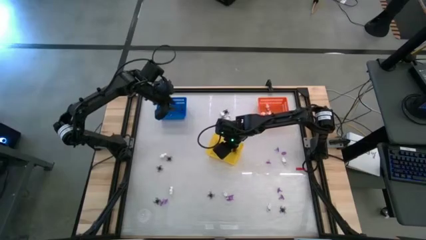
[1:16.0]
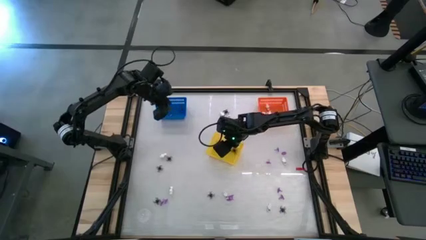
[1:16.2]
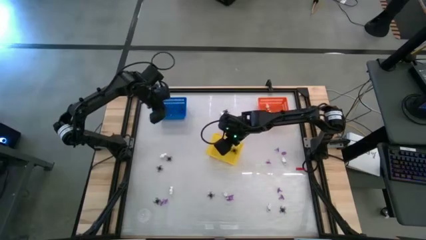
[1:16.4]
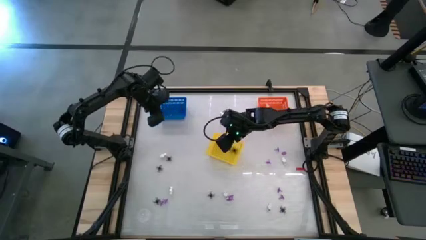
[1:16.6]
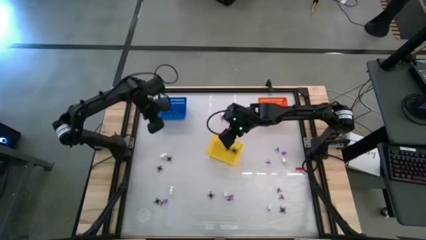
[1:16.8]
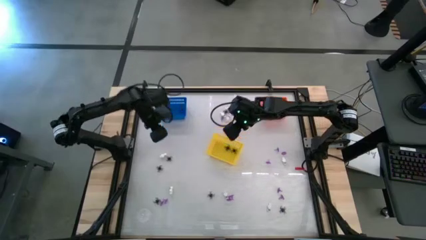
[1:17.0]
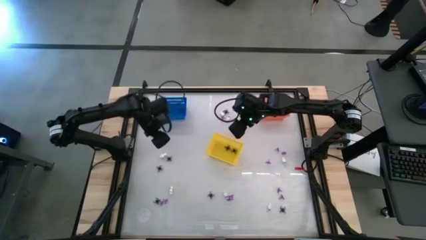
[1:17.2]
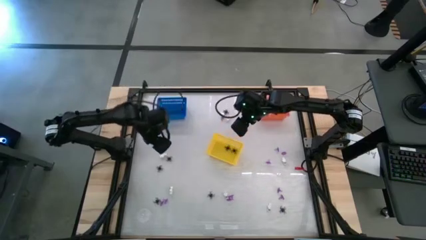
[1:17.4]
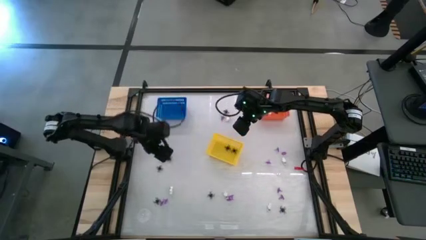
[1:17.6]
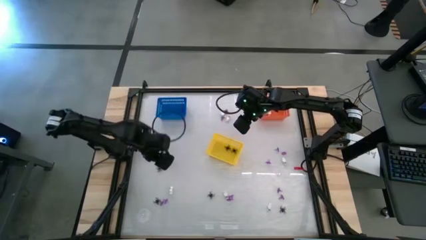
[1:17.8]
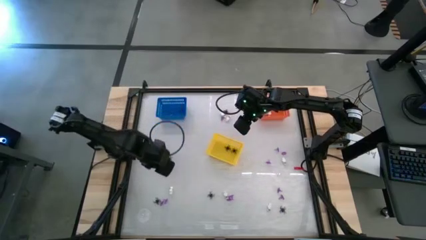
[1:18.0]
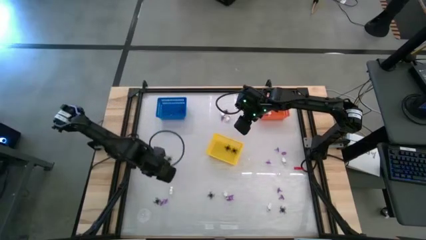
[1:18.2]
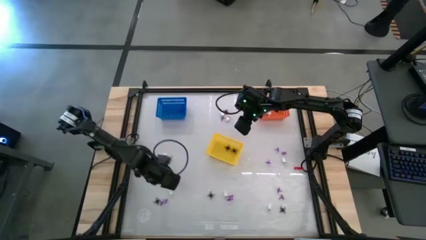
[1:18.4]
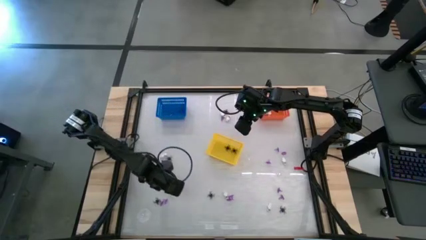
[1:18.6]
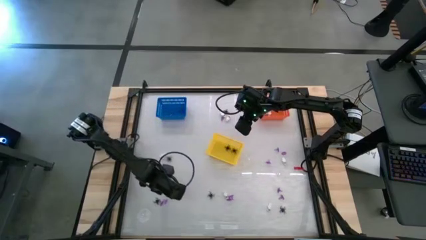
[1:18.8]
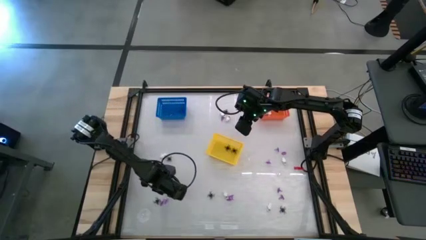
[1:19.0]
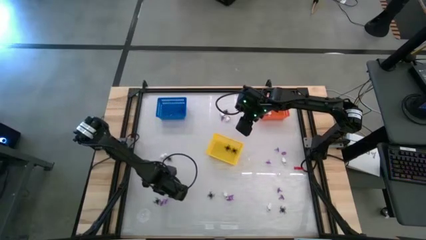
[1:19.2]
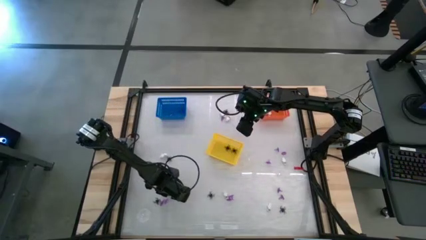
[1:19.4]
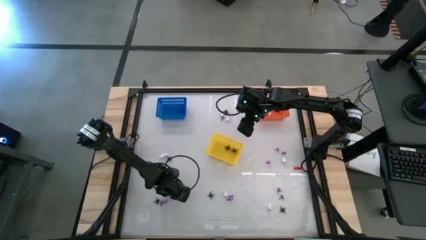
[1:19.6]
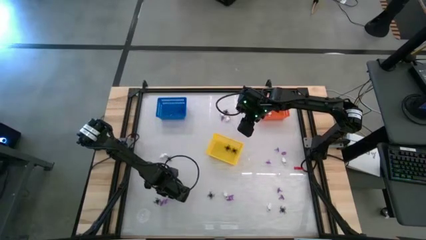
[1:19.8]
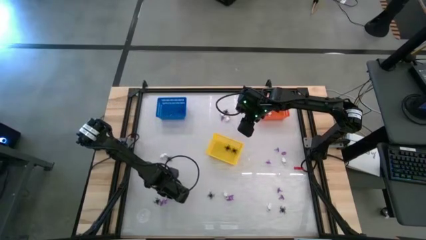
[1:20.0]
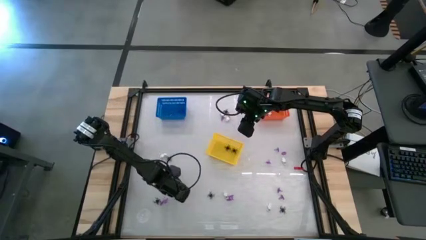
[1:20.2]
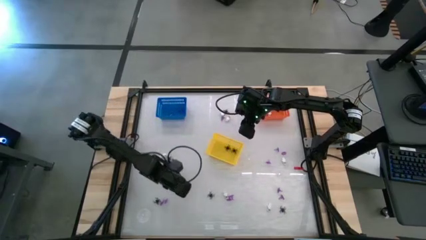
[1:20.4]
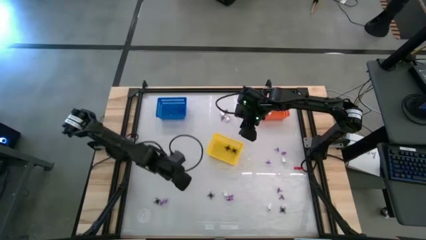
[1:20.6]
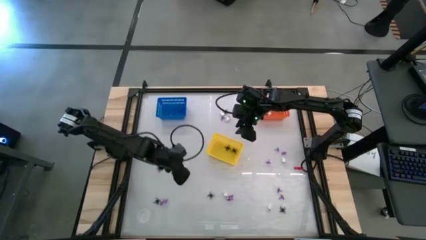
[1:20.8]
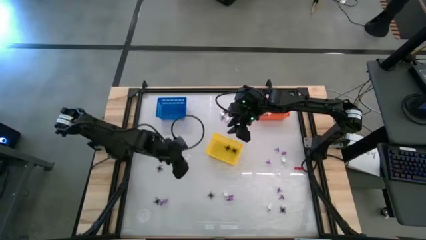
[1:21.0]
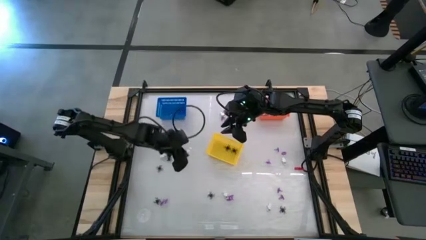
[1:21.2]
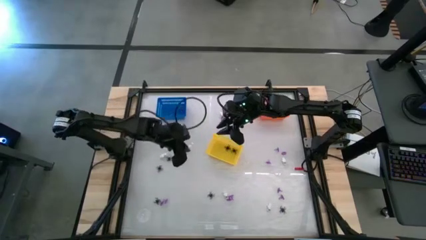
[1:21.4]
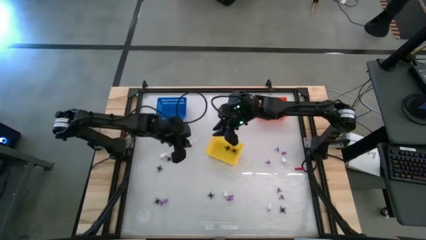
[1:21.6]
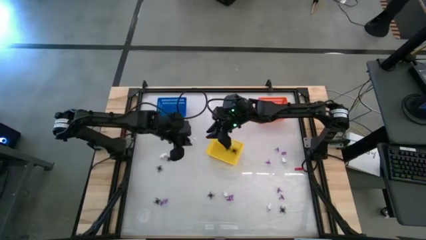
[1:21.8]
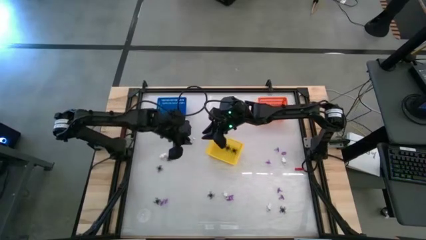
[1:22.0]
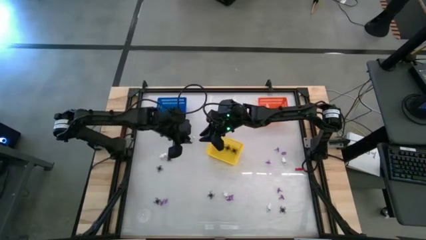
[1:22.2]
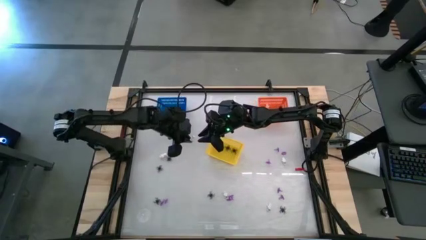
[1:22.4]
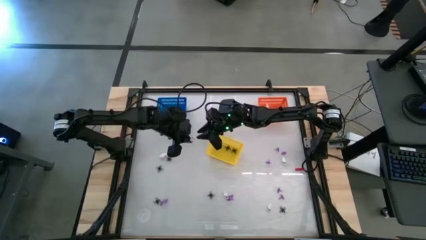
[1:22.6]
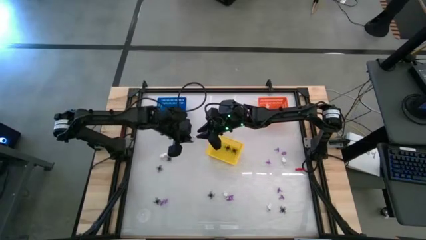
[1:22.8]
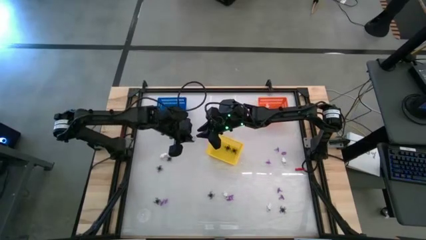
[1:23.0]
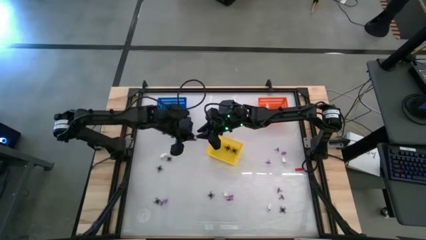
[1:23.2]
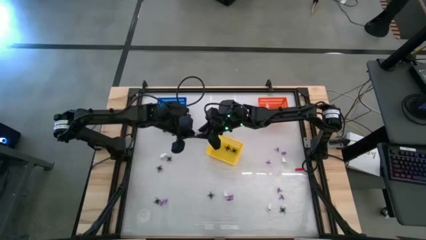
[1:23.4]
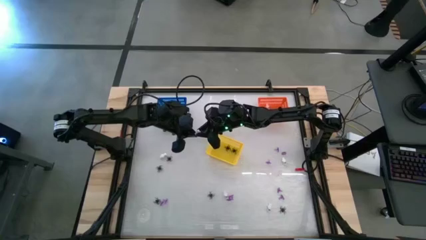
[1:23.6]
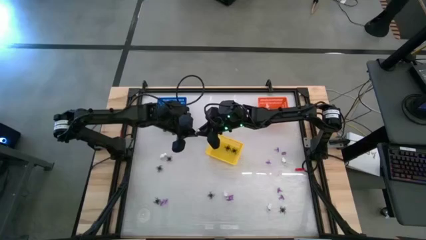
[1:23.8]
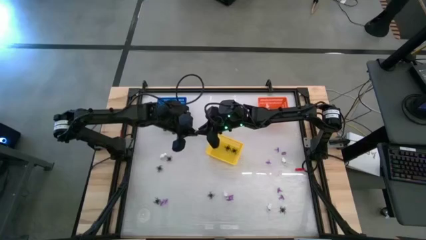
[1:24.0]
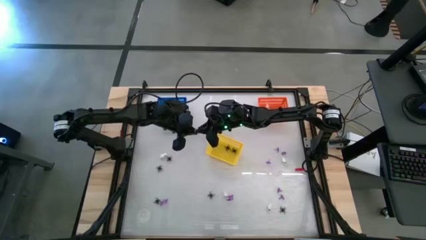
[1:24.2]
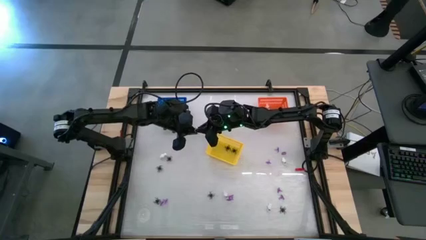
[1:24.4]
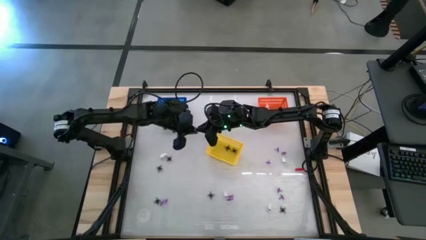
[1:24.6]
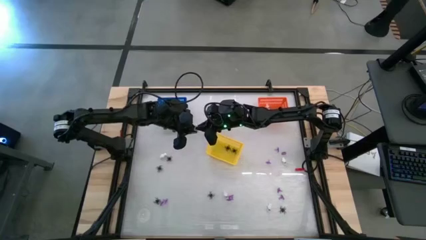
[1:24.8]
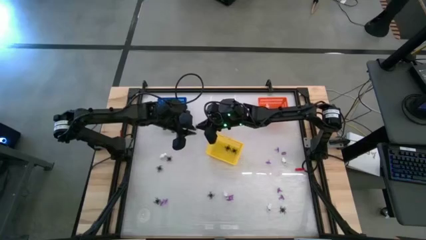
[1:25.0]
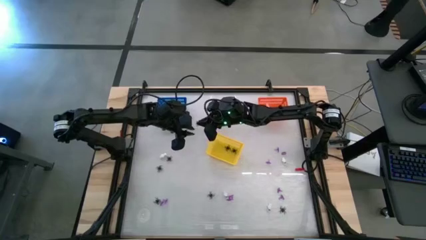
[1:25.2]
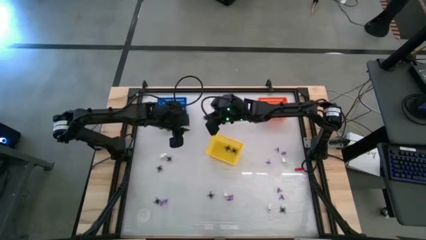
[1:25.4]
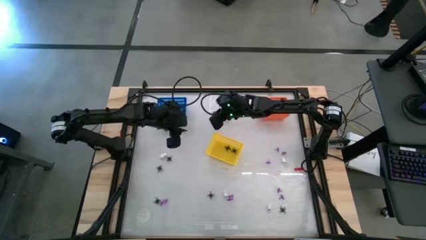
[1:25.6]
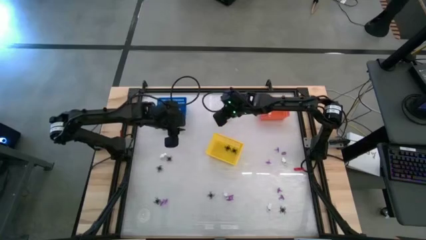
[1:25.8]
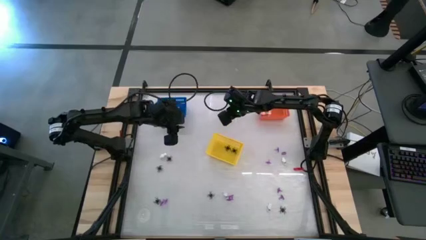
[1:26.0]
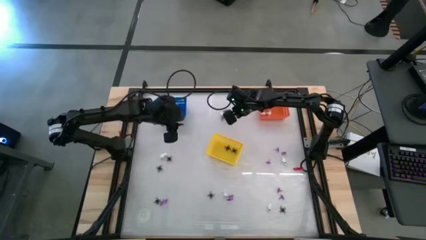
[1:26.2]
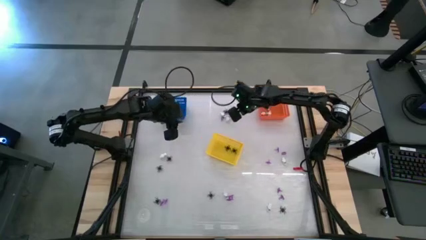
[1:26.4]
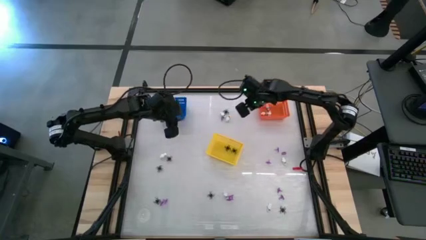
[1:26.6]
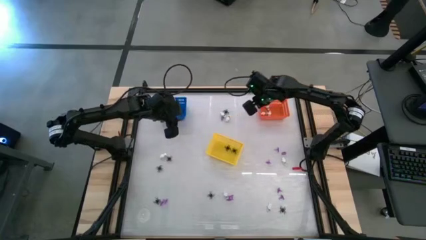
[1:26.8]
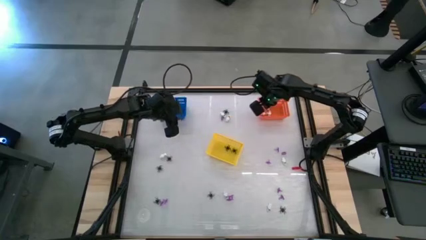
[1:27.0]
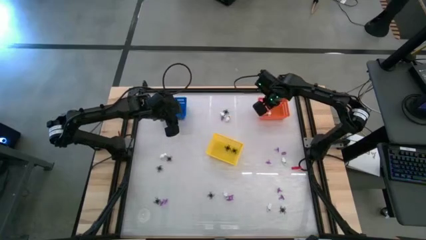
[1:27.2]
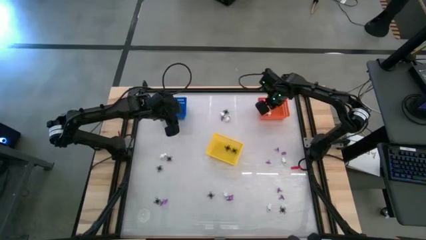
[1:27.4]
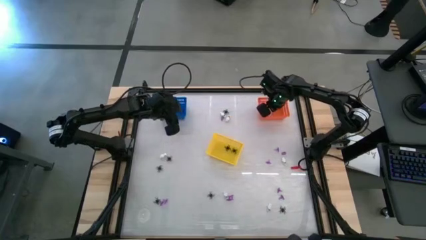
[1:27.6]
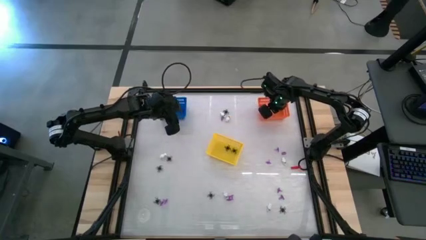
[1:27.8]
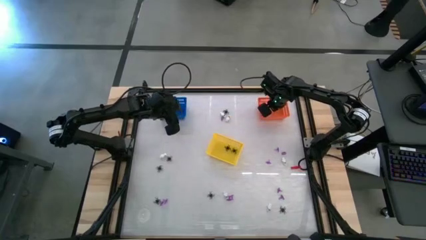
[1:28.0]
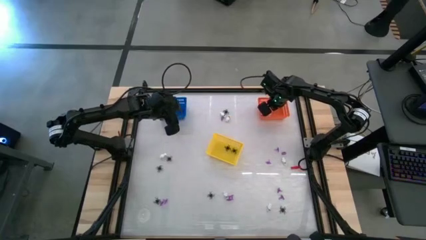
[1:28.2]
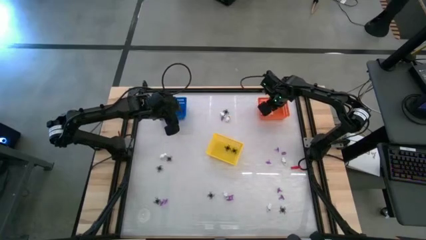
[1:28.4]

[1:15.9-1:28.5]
Task: Sort Halloween decoration
Put the white skeleton toy into the orange bin
